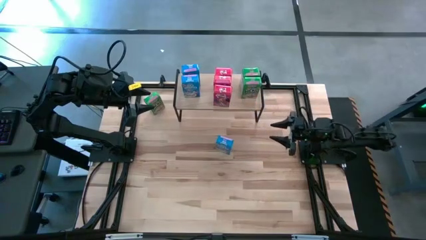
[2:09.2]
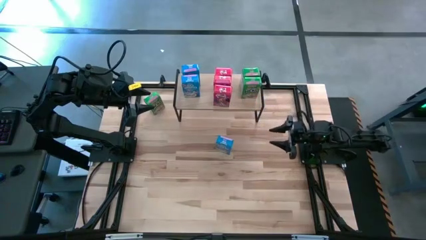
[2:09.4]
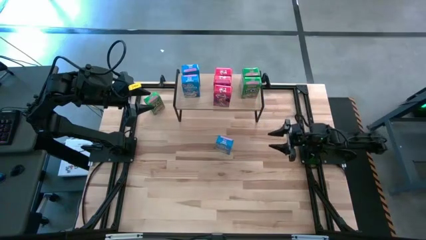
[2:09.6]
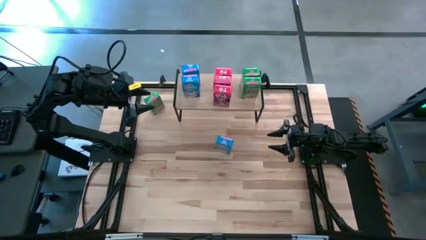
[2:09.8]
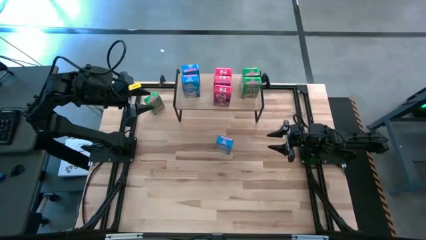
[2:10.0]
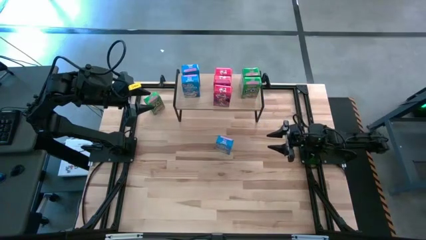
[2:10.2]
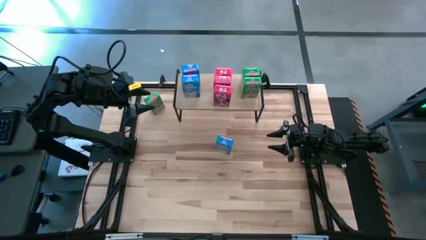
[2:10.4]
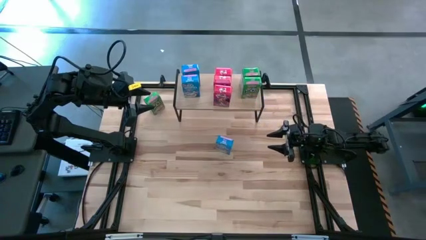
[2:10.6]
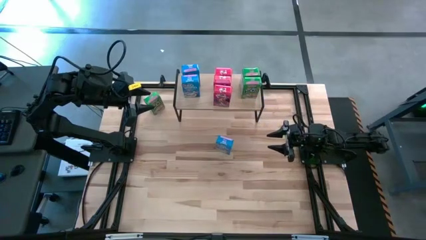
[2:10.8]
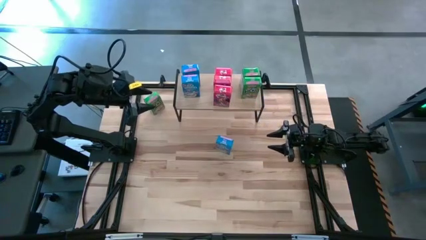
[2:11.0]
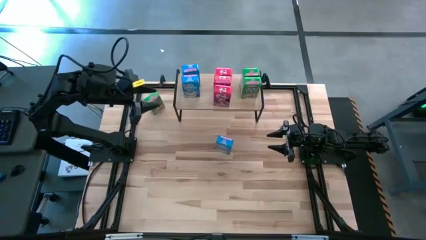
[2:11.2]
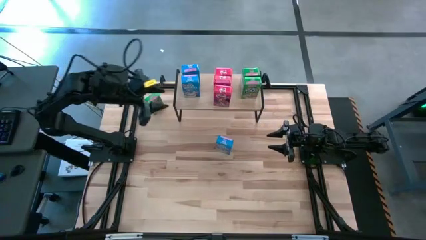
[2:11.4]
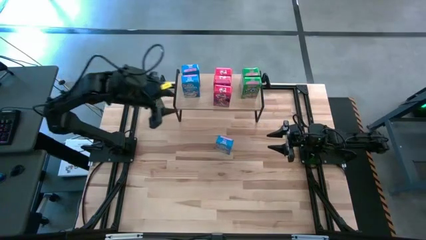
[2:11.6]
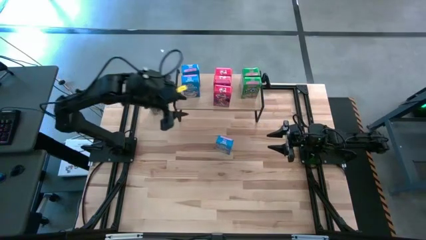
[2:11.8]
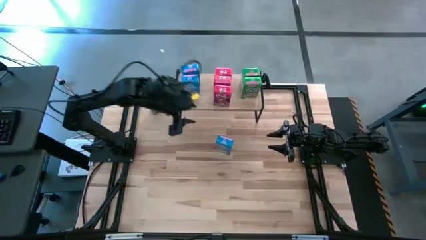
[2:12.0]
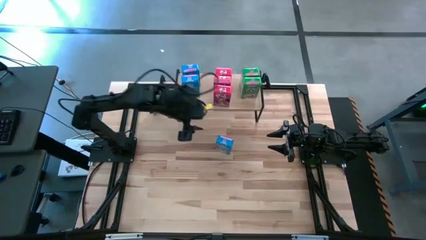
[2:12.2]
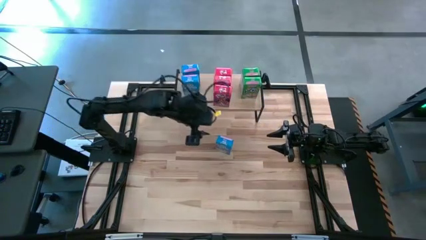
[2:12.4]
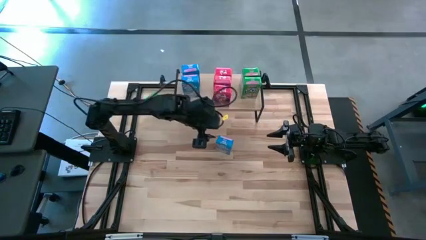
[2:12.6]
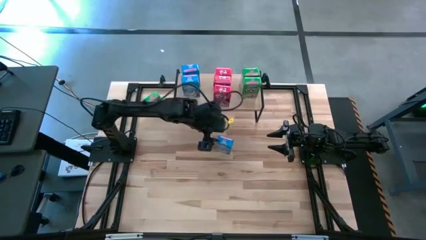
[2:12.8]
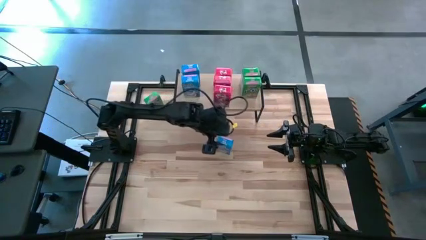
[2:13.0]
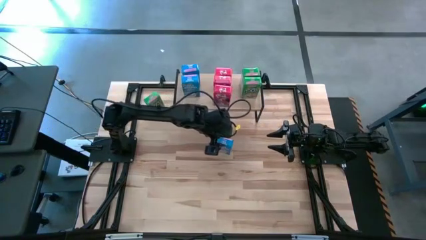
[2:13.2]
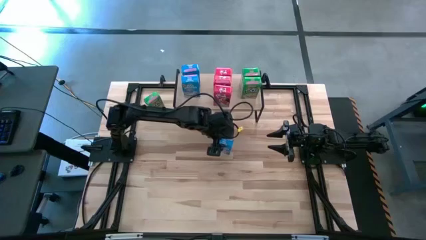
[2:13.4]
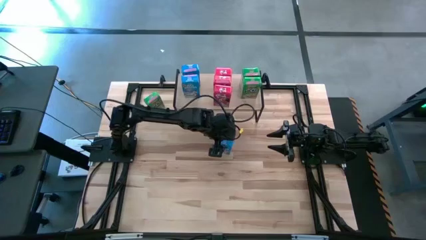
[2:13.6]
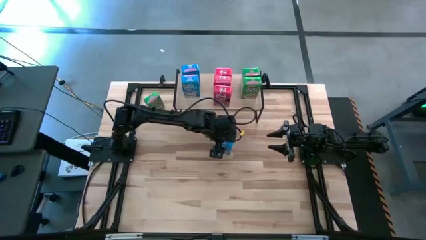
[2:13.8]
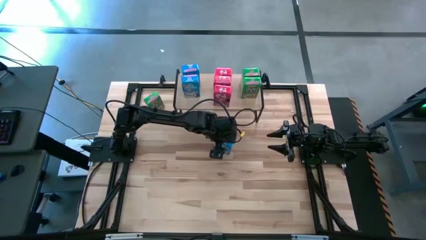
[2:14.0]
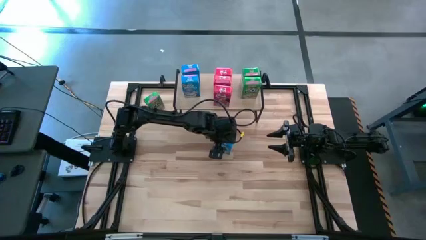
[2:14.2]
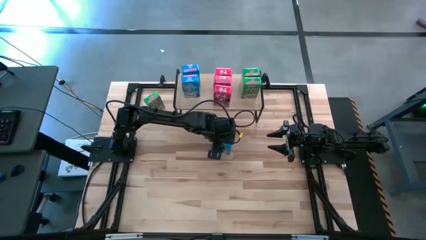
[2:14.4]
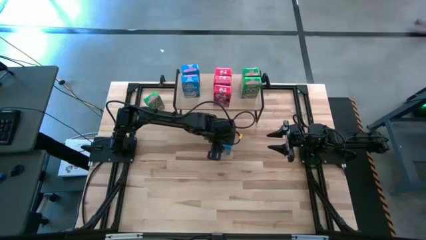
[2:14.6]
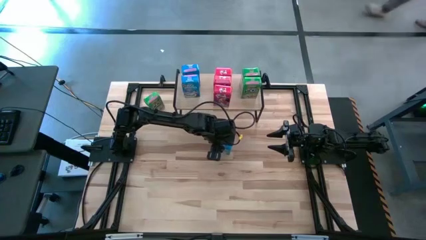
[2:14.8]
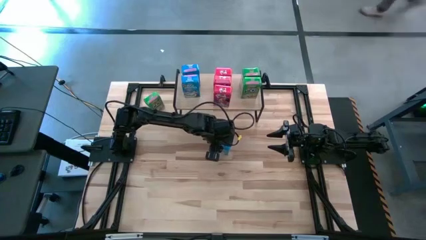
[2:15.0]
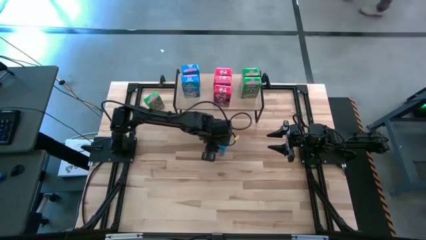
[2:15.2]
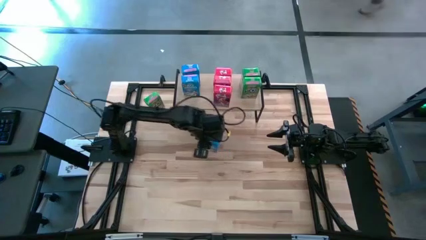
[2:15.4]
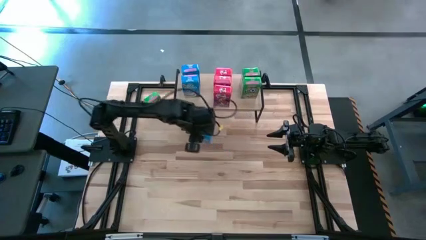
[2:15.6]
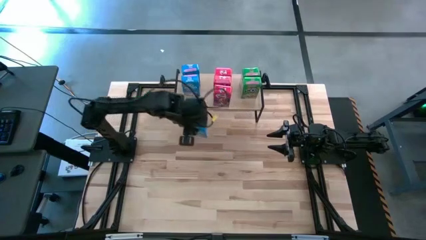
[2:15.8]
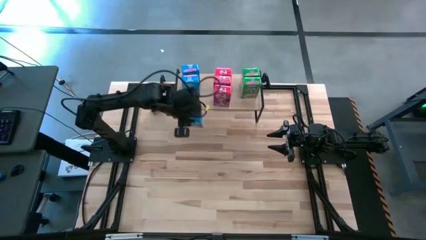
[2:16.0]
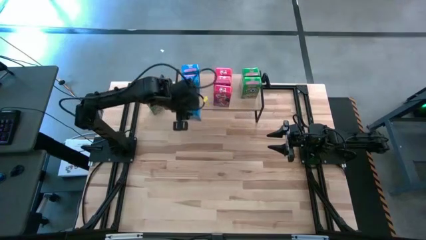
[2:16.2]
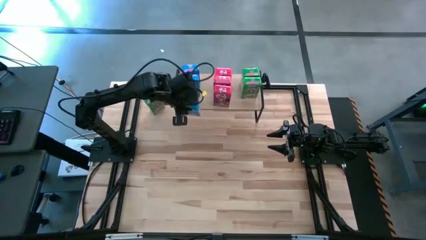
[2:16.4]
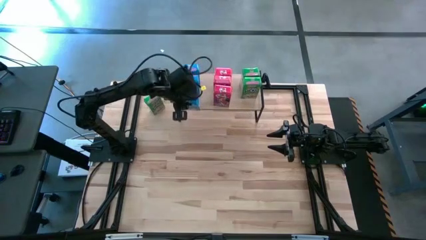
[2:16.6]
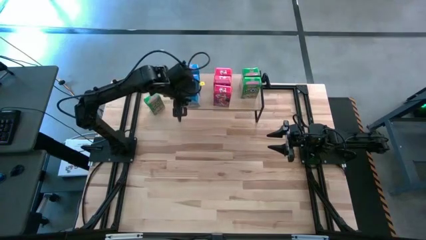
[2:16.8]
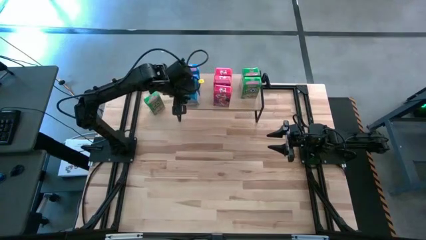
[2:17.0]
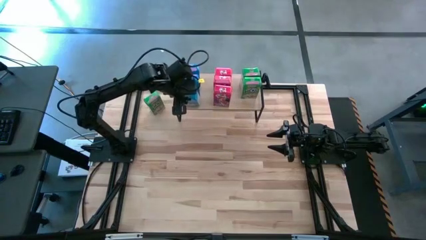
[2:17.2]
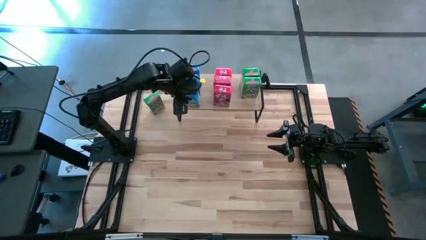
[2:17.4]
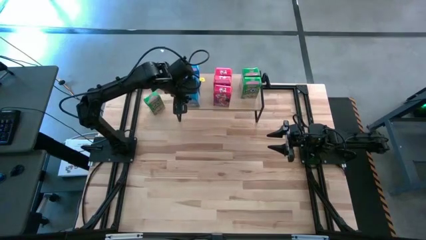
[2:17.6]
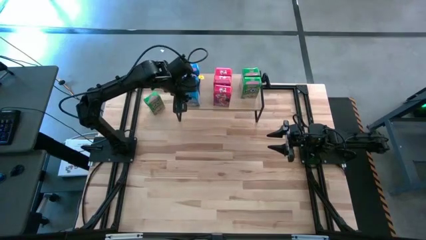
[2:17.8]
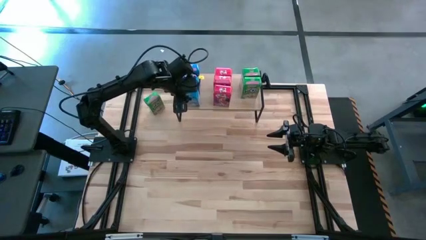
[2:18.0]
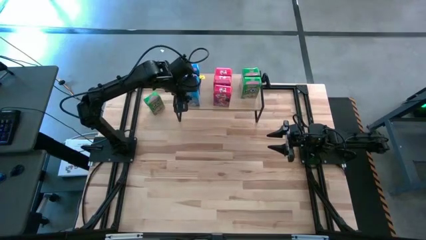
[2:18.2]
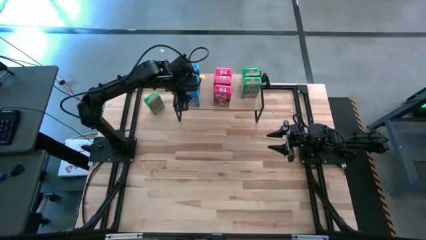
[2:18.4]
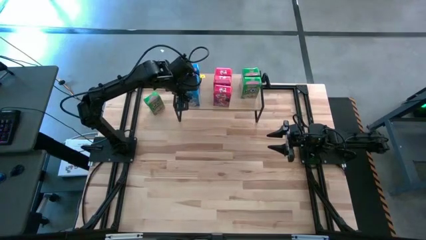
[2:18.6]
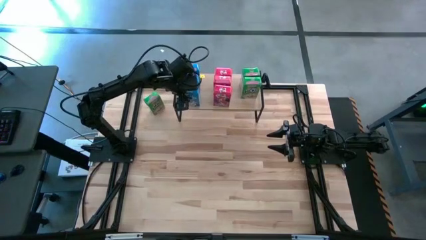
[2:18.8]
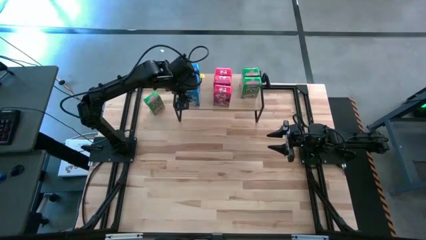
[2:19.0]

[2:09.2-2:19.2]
Task: Stack cereal on shelf
Put the blue cereal box on the shelf aligned with the other blue cereal boxes

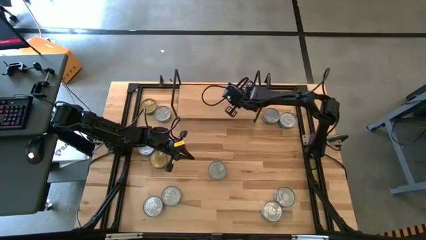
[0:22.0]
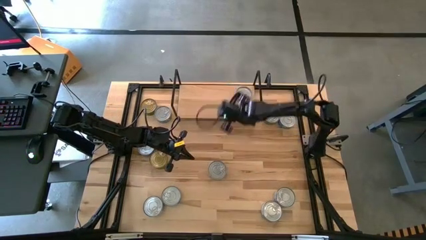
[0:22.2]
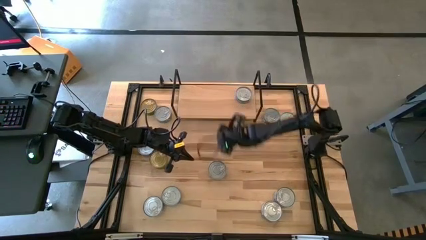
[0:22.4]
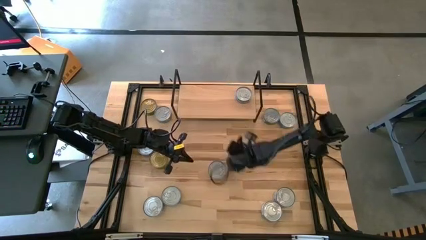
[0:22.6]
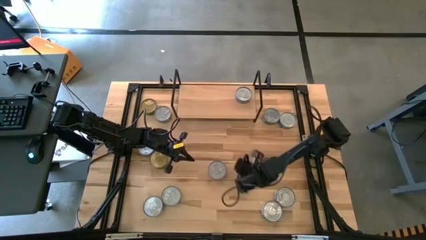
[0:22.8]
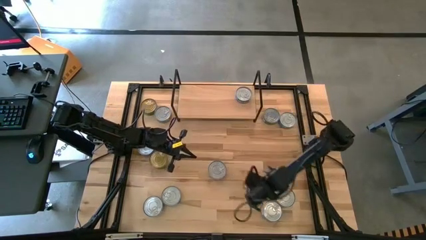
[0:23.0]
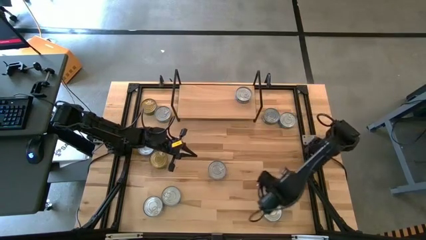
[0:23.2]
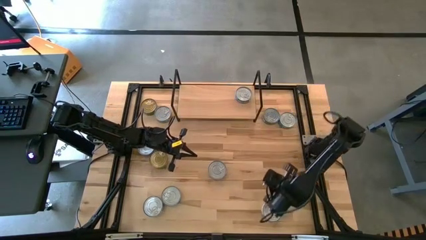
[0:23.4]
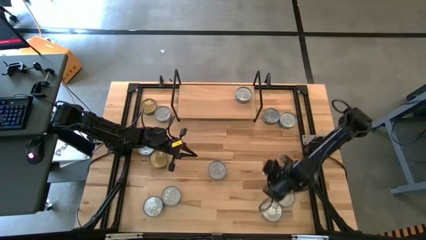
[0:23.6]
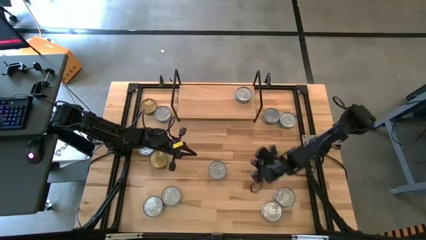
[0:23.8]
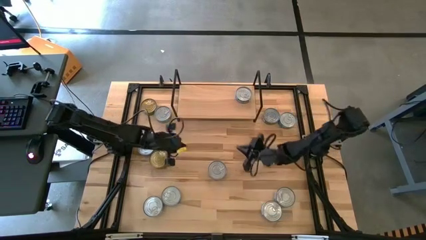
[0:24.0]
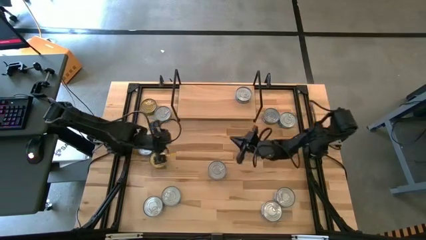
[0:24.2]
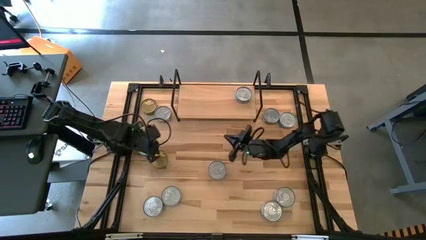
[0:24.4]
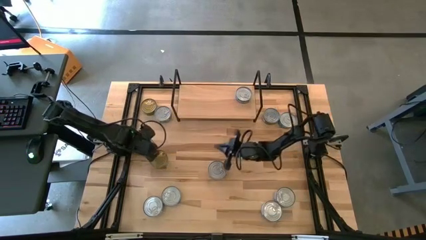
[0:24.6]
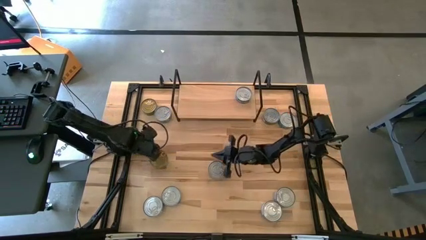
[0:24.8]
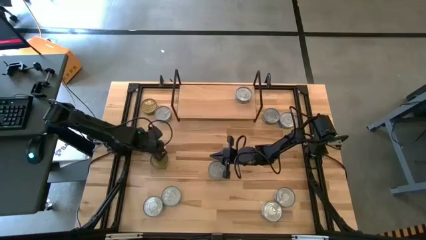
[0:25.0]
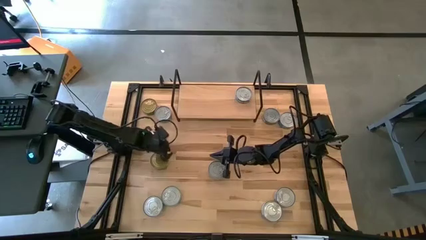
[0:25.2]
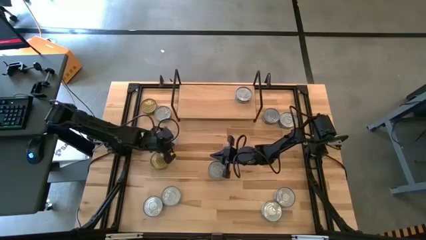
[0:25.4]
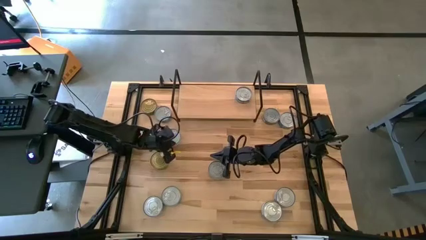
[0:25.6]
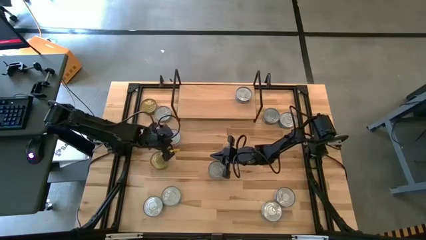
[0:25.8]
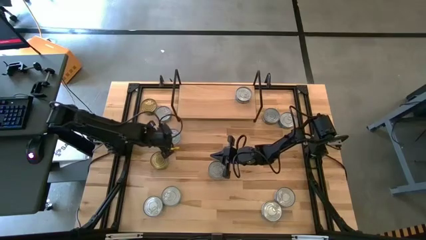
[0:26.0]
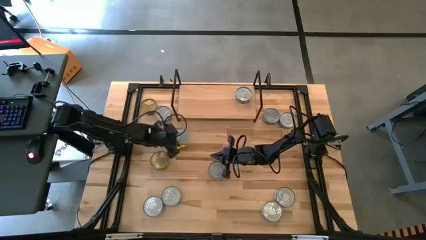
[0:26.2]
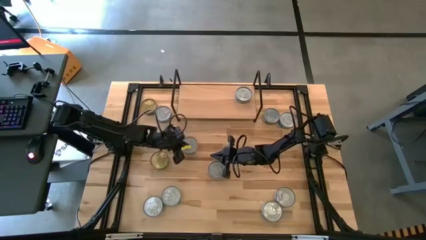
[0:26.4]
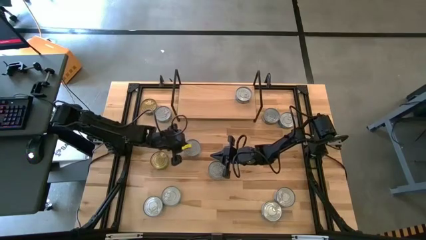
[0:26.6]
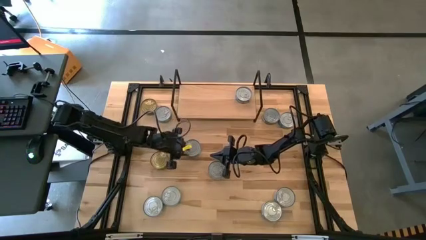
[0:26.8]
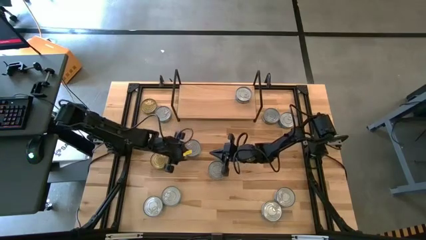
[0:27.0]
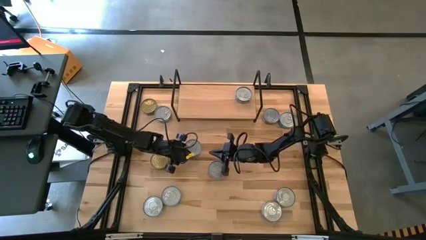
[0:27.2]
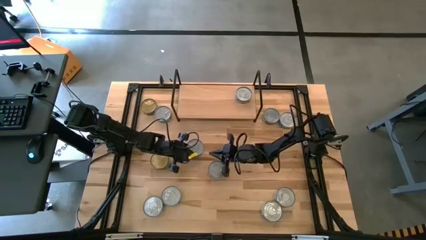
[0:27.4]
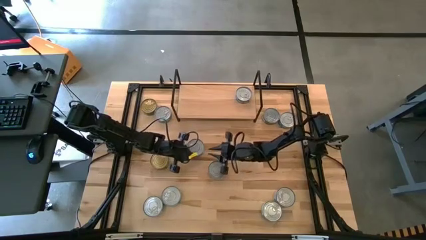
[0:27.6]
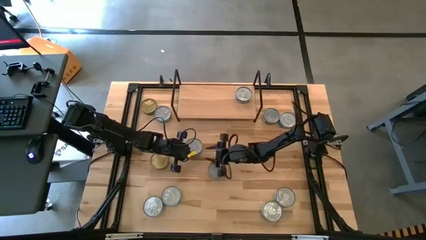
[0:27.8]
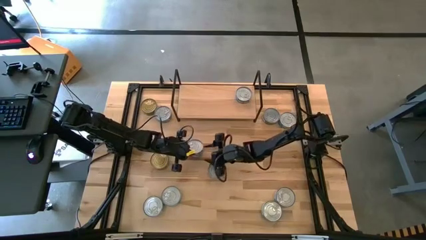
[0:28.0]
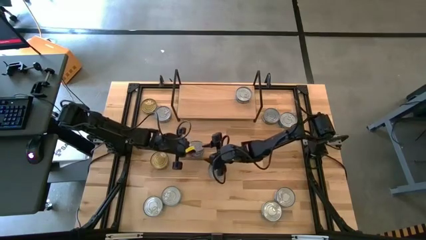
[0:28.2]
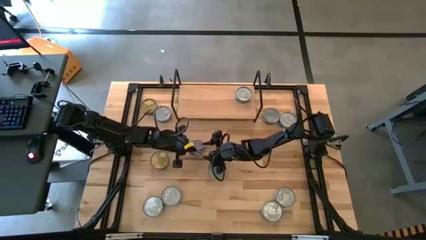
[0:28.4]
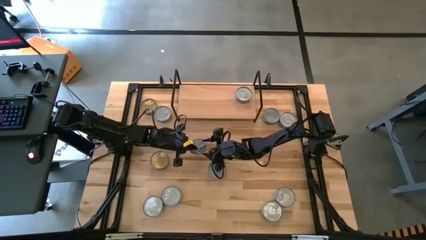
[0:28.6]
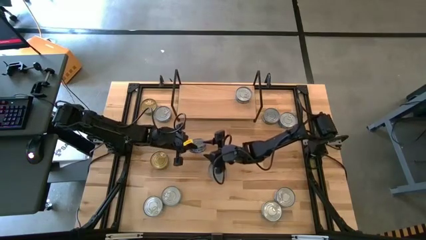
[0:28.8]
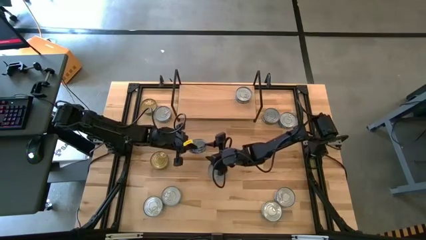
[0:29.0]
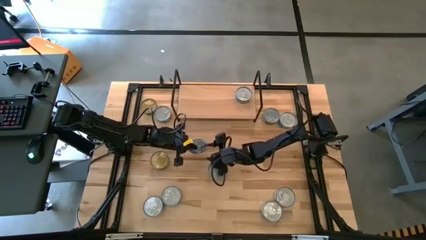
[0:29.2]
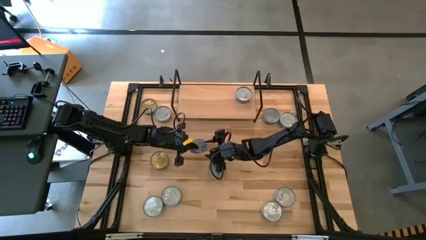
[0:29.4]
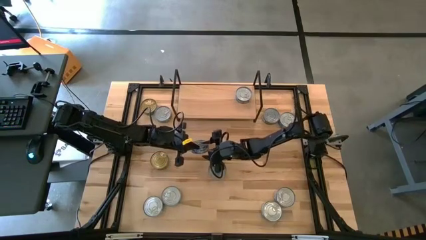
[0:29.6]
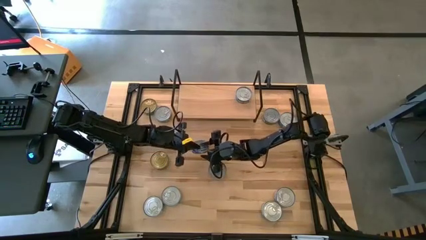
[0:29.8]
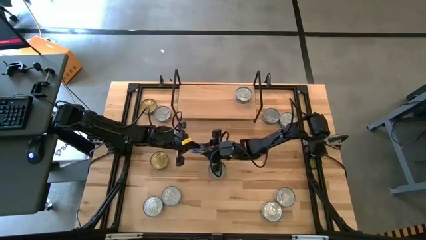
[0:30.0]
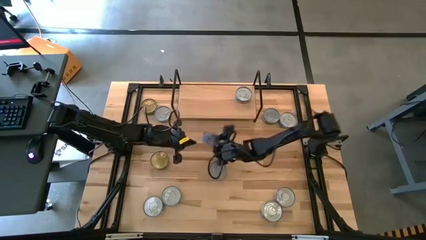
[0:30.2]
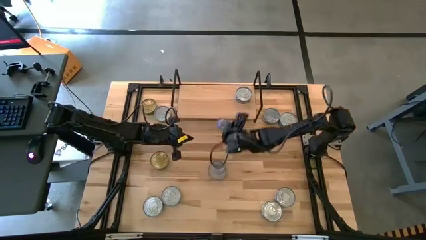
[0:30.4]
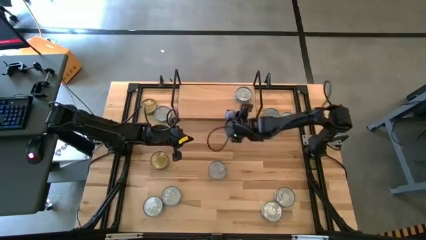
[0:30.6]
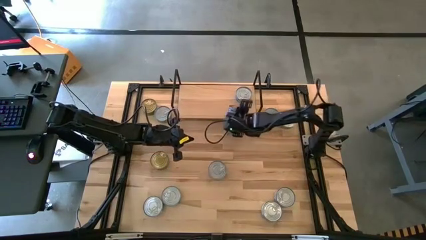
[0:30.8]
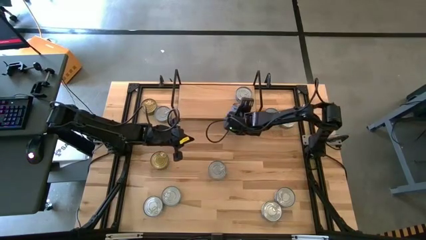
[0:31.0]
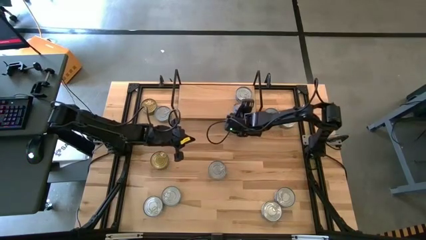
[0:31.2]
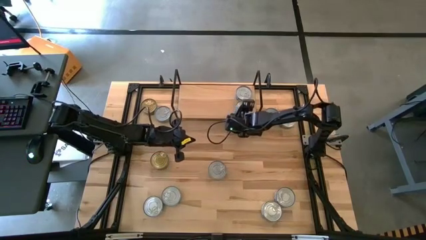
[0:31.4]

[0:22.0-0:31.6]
Task: Stack canned seafood by type on shelf
Put the blue tuna can on the shelf aligned with the other blue tuna can
